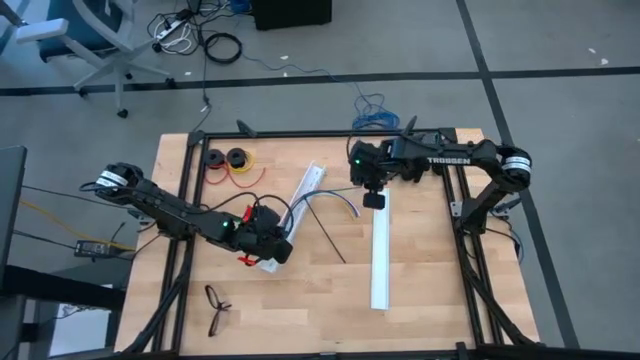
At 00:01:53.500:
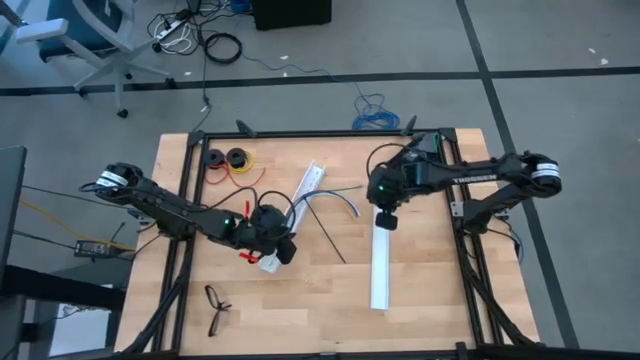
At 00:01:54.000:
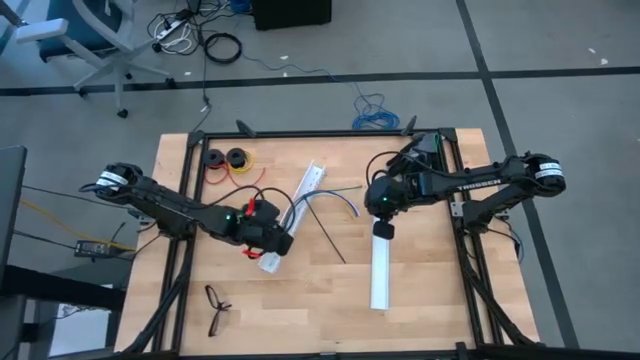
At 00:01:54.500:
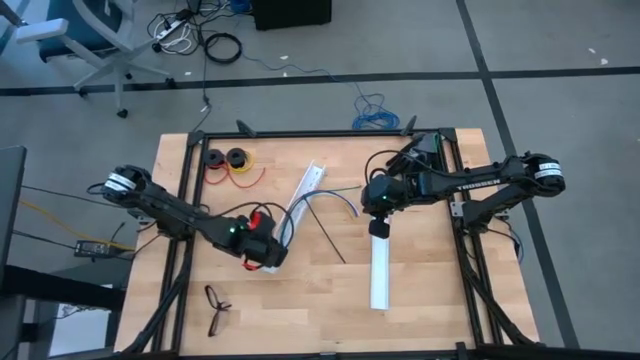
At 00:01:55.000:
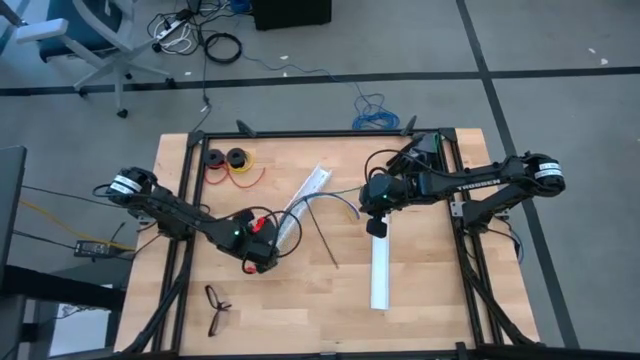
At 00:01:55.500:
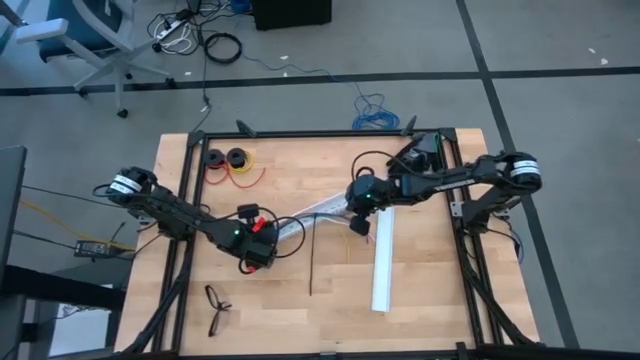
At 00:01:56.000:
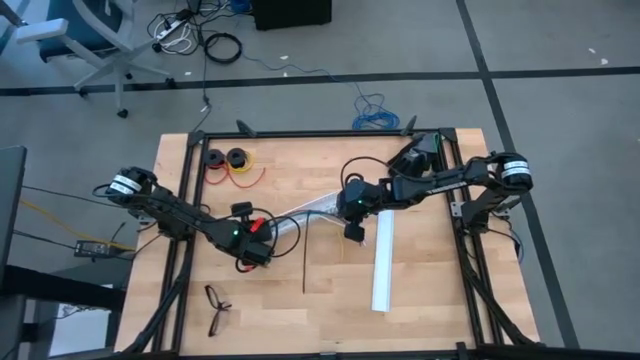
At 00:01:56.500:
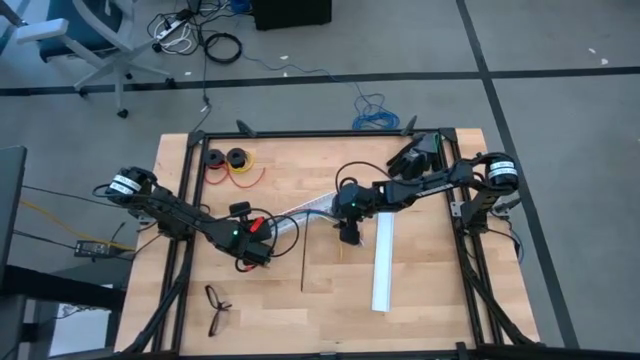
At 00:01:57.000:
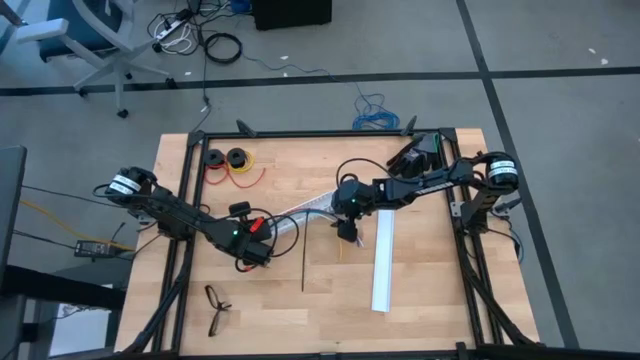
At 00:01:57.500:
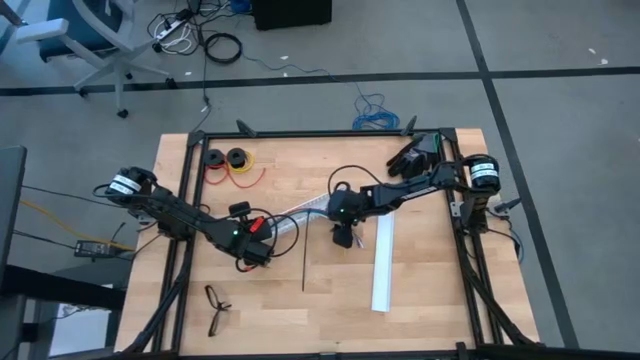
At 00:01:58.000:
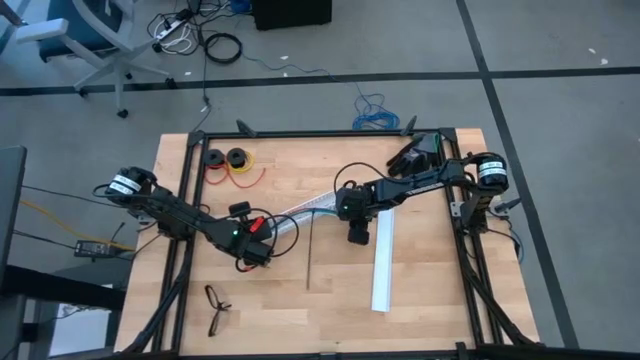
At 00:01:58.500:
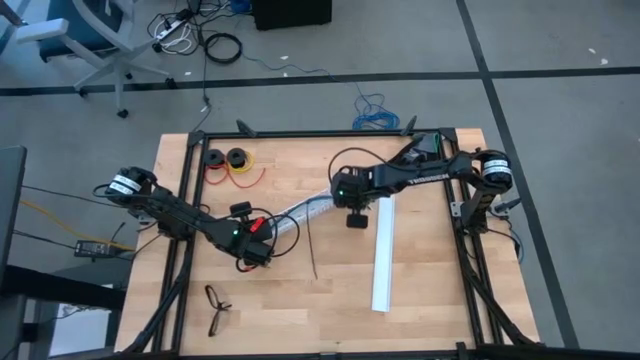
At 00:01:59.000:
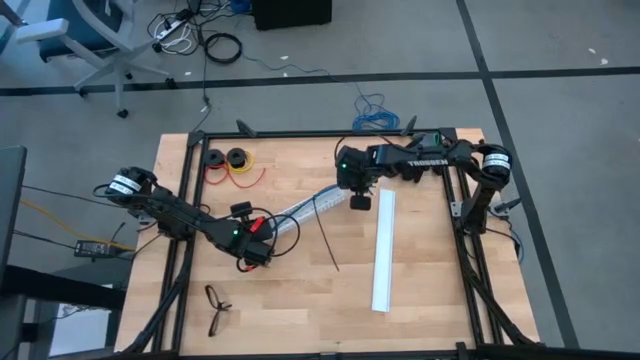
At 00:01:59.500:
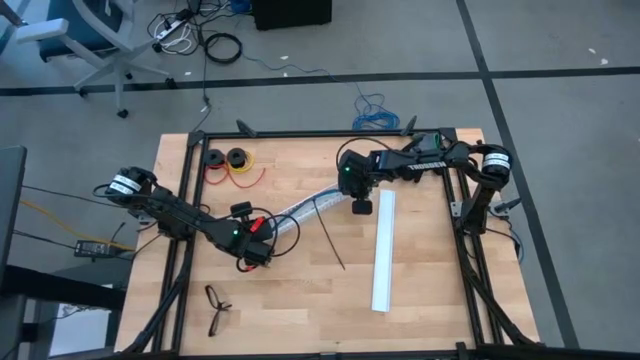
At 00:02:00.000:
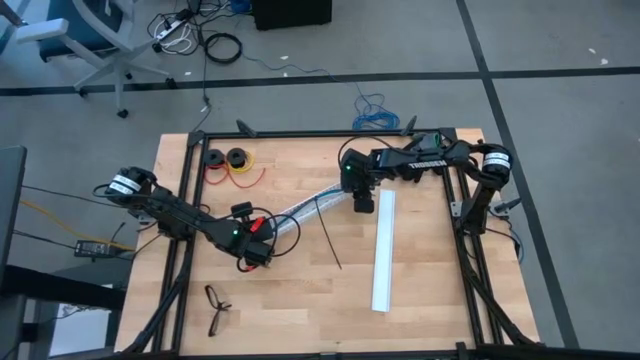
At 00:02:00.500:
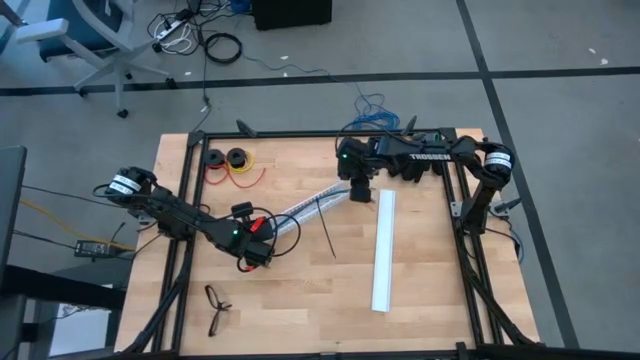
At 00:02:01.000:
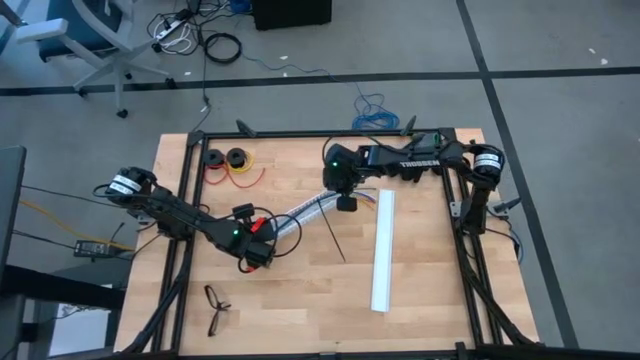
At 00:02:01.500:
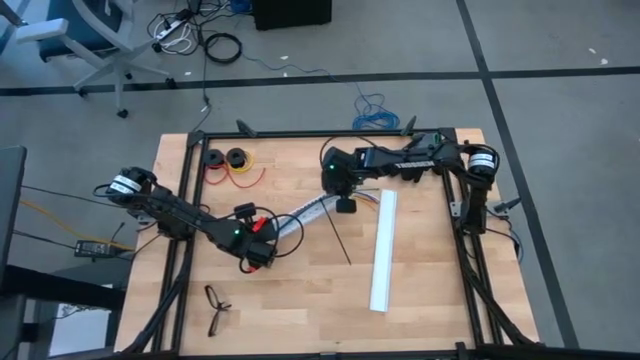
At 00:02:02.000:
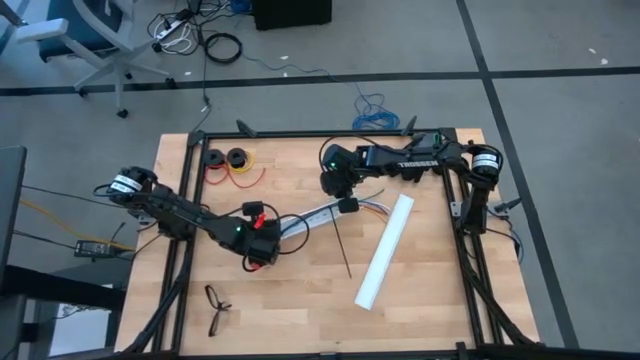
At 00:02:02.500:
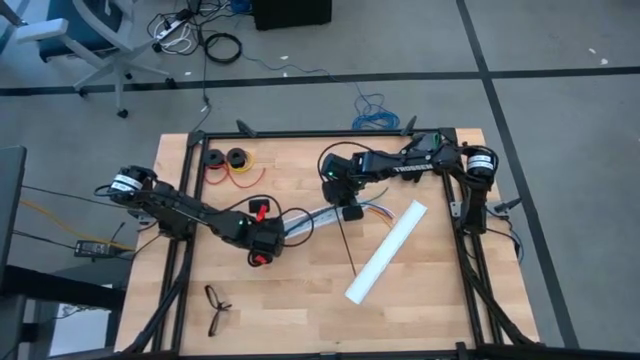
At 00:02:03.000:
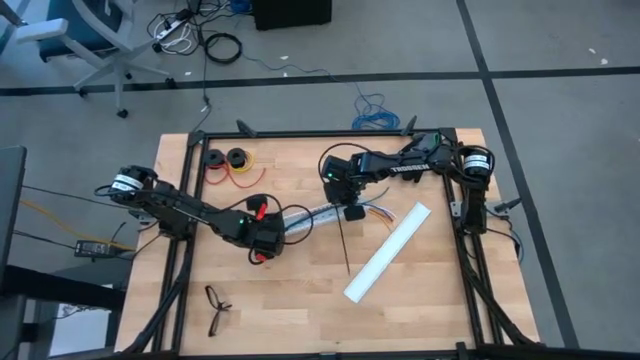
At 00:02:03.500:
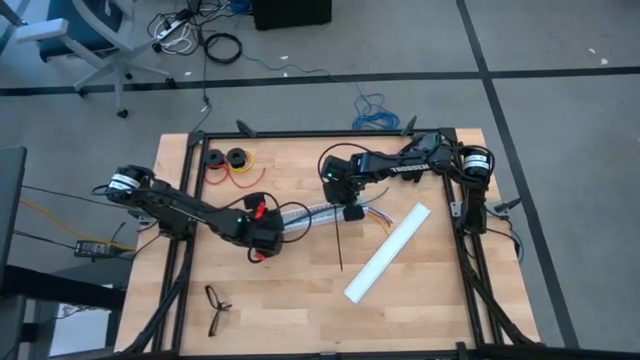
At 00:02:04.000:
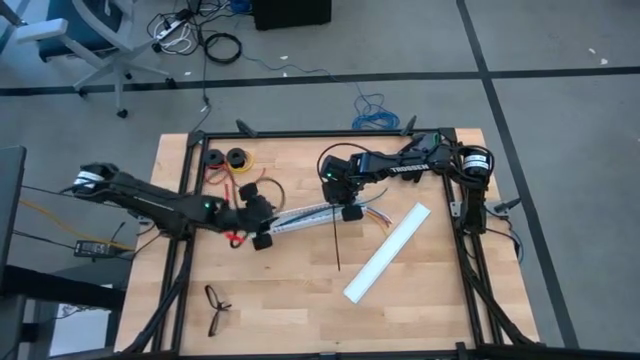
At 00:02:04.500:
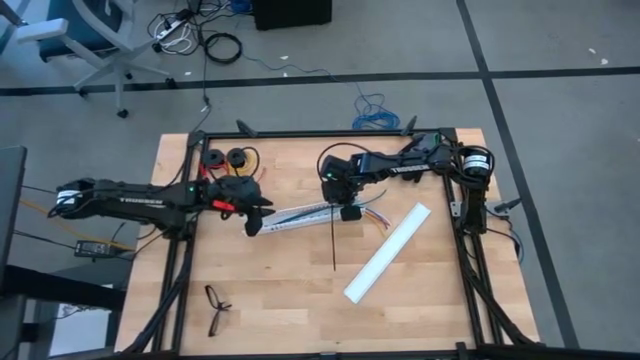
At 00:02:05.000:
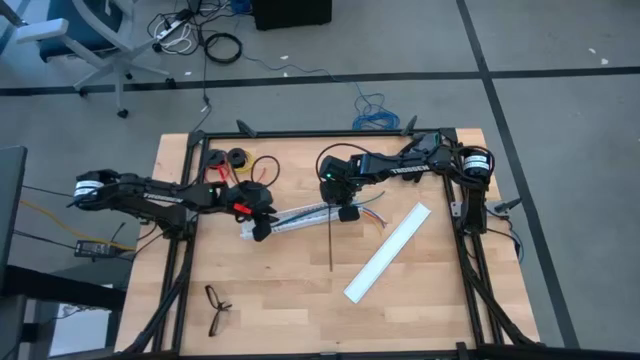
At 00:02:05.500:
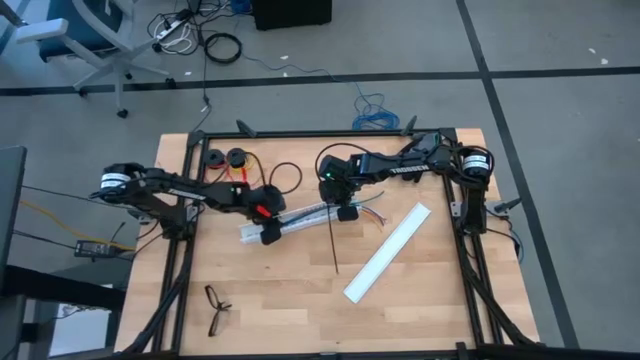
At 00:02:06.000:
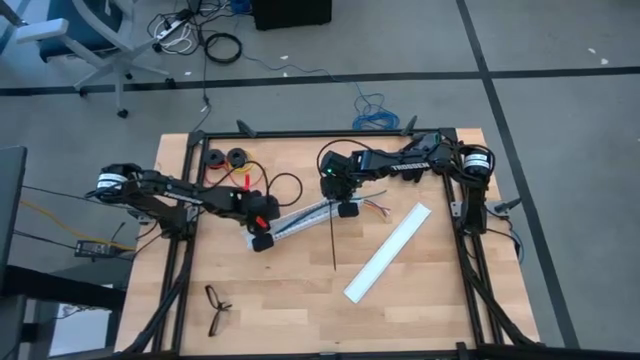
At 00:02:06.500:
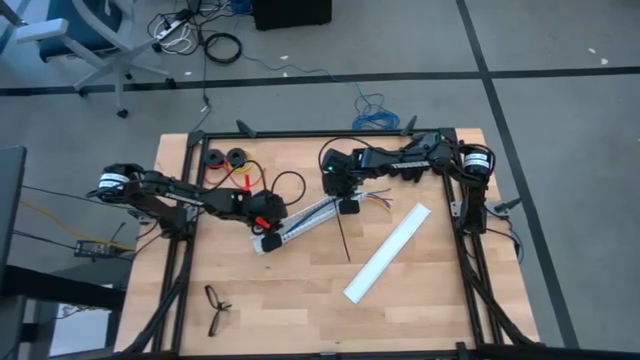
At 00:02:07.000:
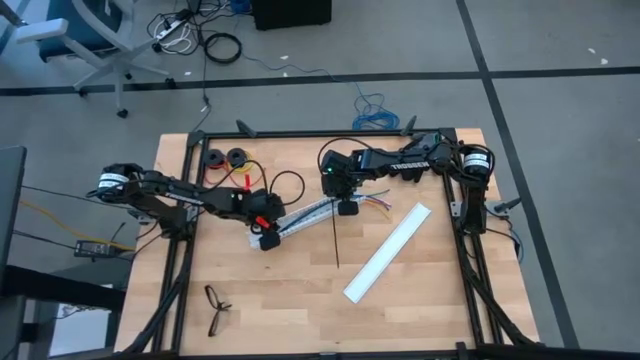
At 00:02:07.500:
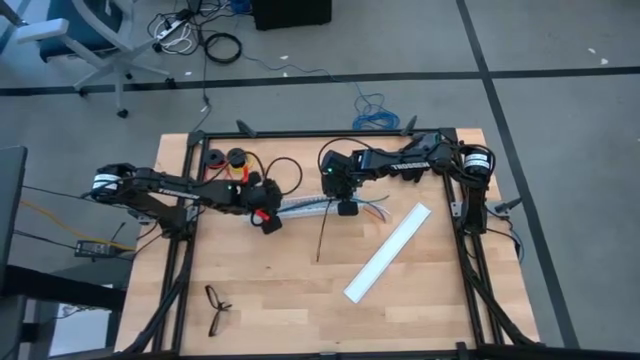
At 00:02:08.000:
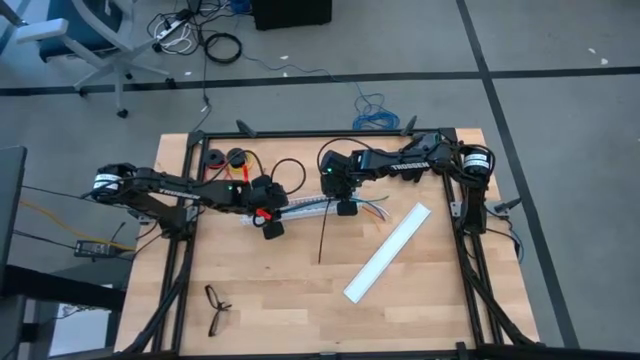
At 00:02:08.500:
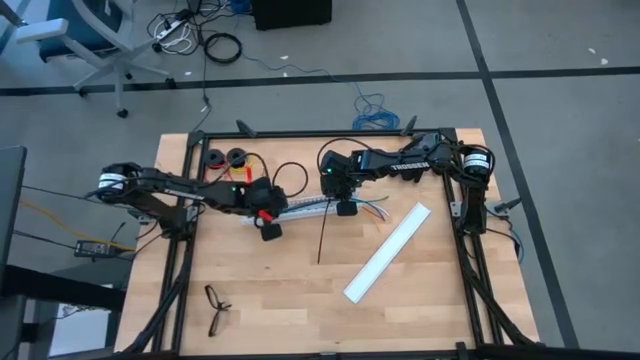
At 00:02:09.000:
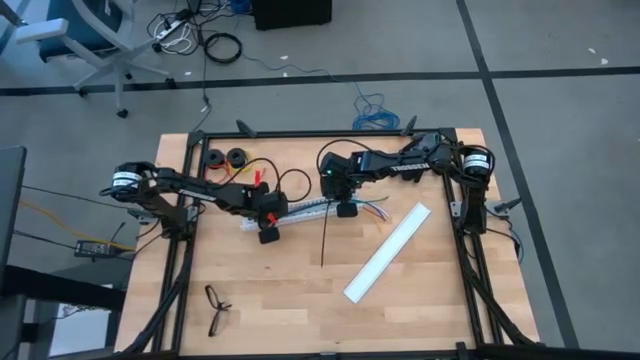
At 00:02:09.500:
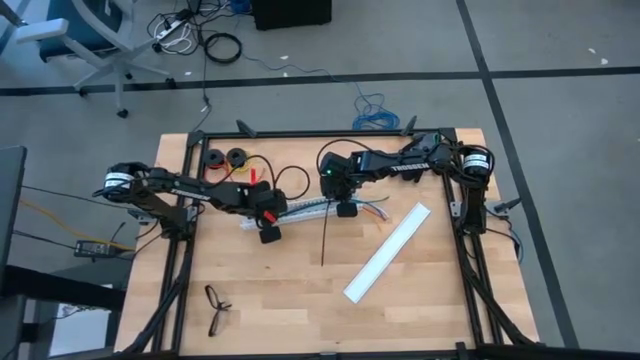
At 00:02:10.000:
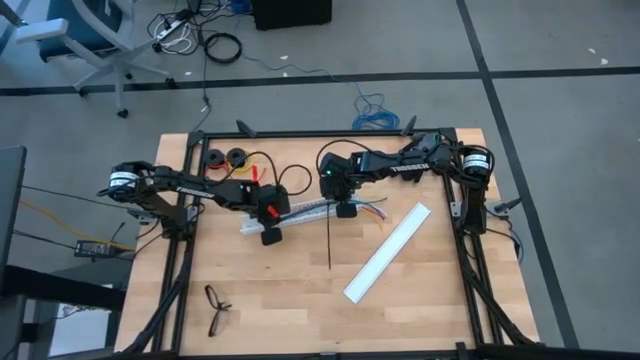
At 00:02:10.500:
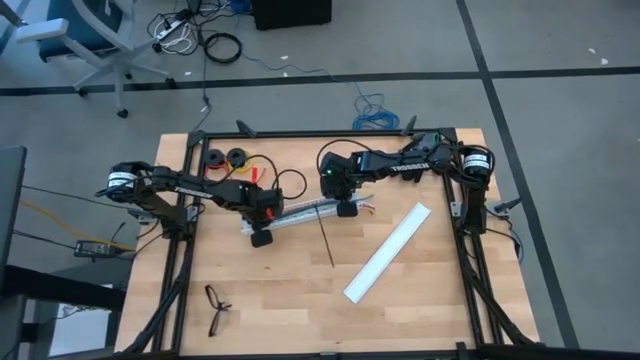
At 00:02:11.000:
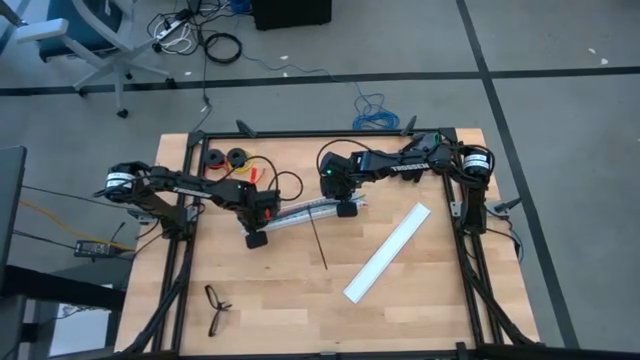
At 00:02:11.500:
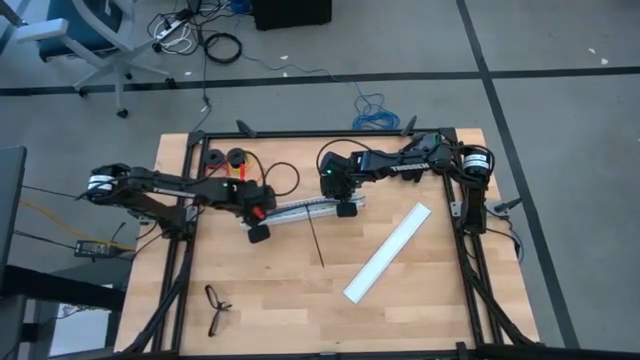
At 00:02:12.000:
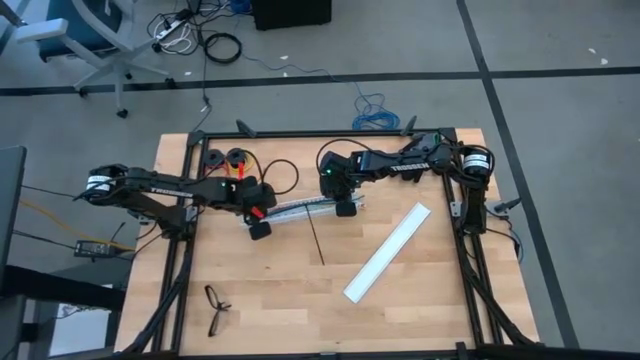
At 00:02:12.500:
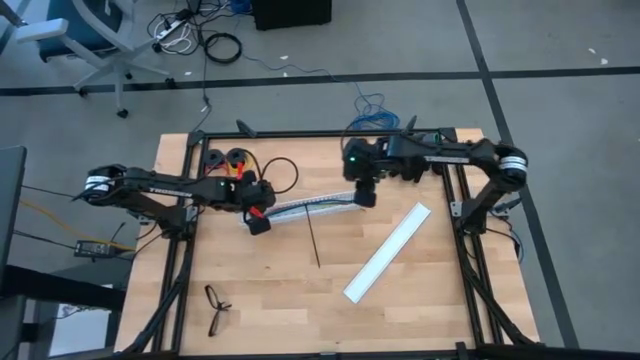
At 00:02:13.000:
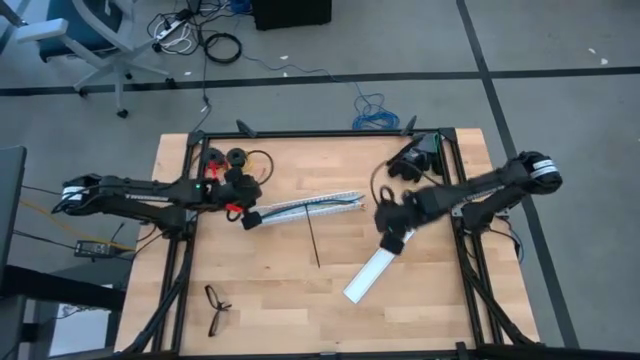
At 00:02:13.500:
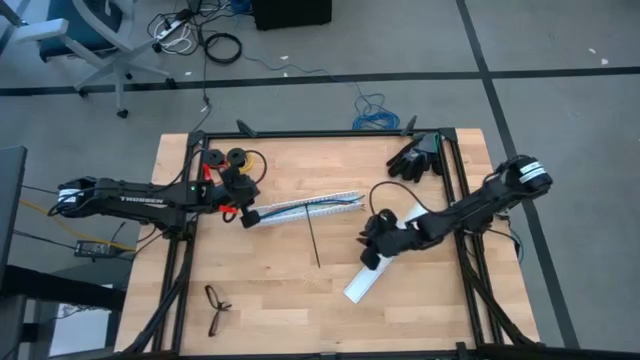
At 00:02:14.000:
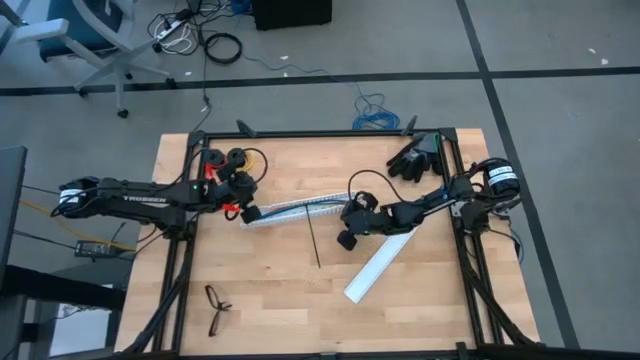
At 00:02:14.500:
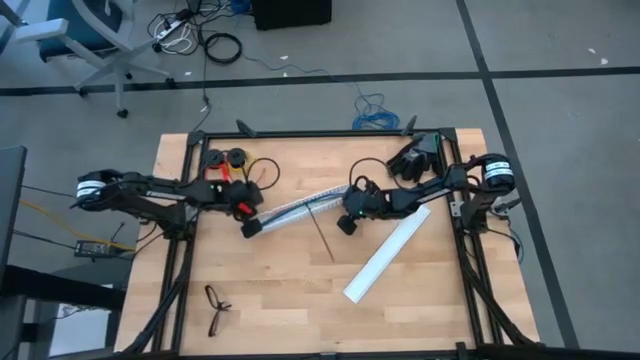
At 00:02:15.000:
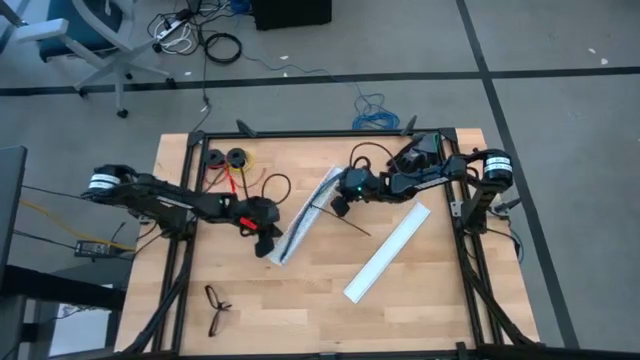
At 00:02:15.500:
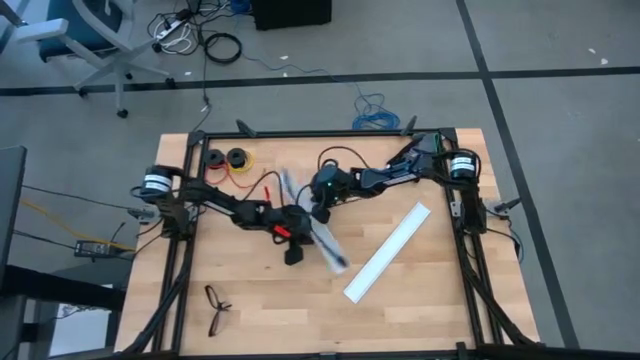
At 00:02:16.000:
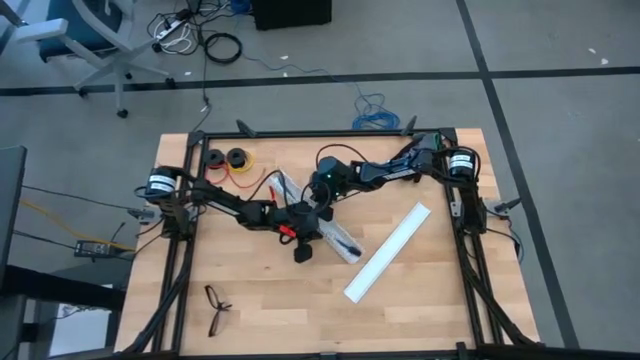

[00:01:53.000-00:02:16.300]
Task: Ziptie cables
Put the zip-tied cables into the white cable duct
